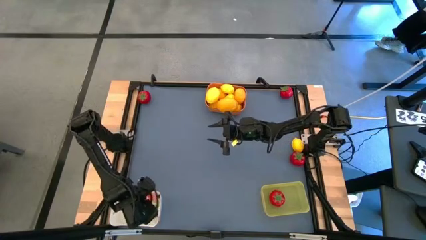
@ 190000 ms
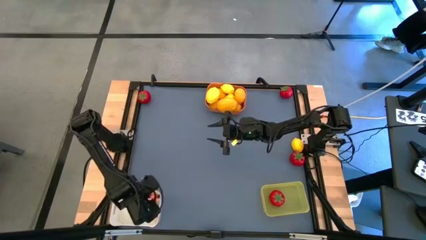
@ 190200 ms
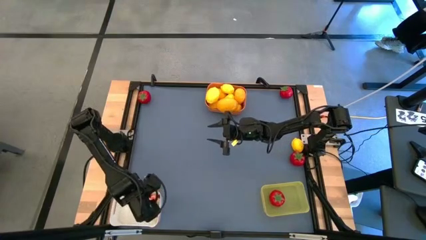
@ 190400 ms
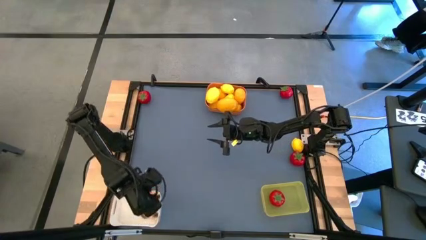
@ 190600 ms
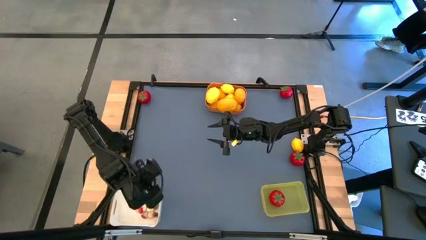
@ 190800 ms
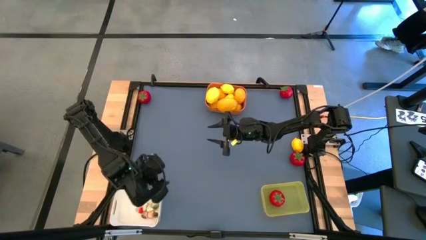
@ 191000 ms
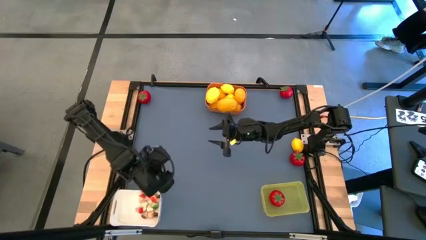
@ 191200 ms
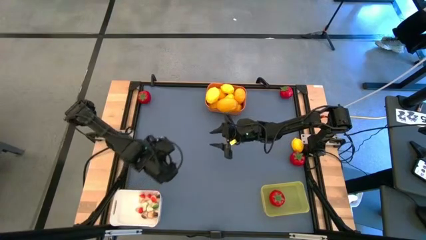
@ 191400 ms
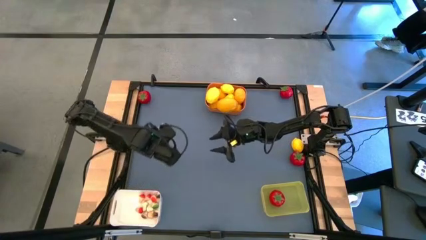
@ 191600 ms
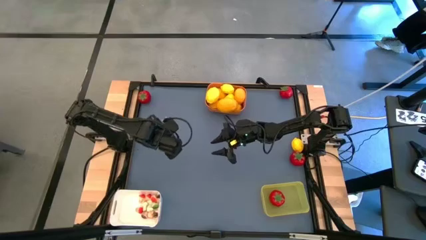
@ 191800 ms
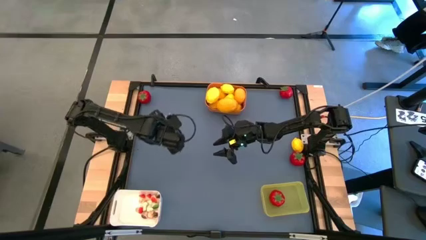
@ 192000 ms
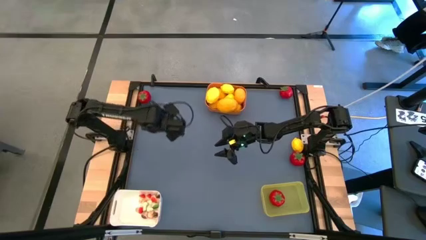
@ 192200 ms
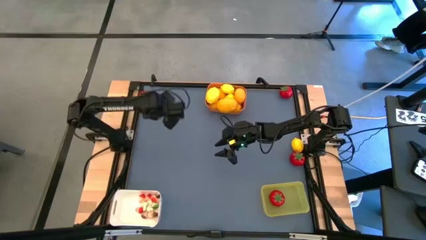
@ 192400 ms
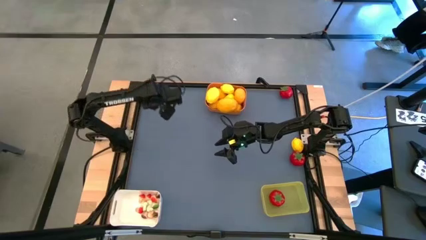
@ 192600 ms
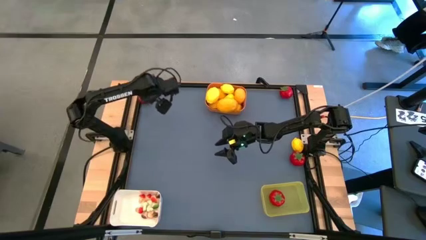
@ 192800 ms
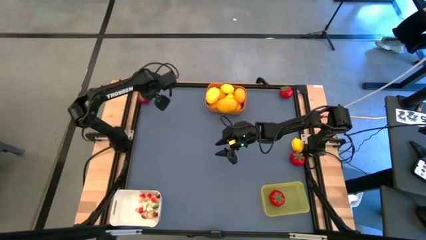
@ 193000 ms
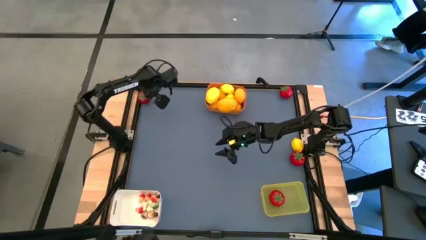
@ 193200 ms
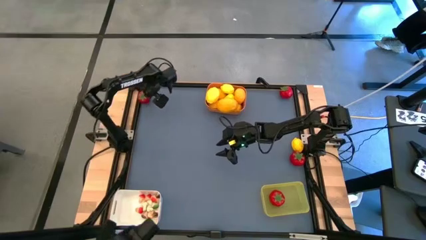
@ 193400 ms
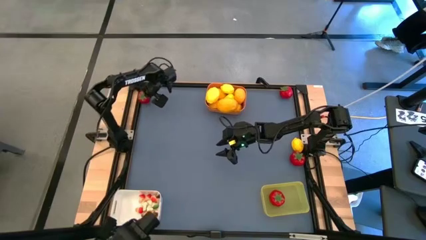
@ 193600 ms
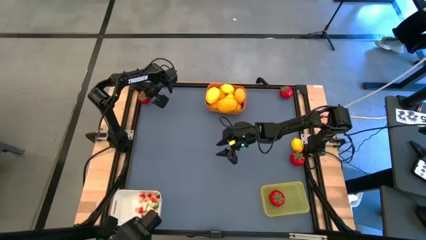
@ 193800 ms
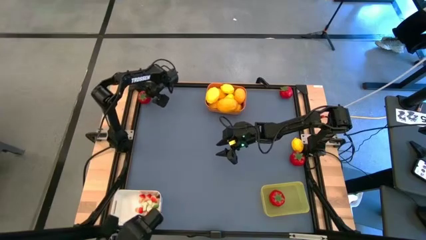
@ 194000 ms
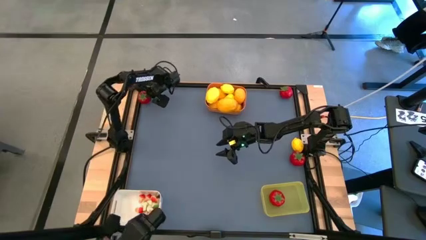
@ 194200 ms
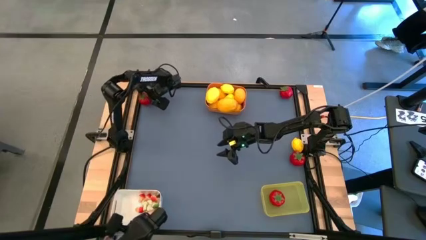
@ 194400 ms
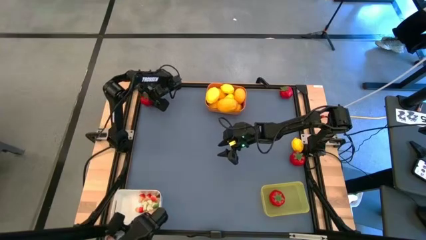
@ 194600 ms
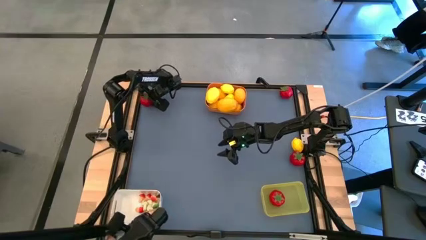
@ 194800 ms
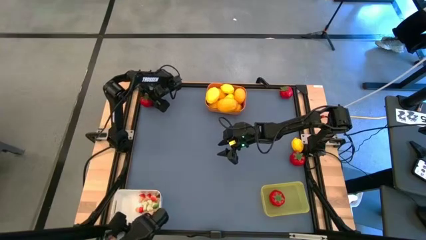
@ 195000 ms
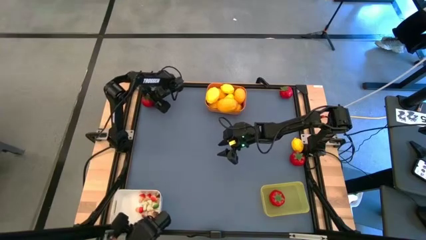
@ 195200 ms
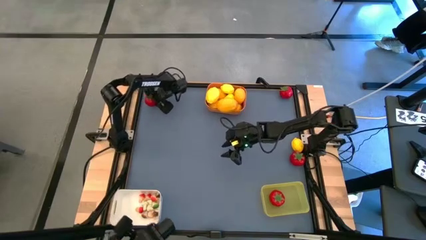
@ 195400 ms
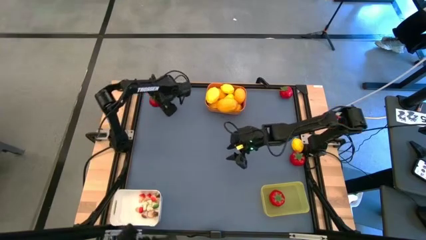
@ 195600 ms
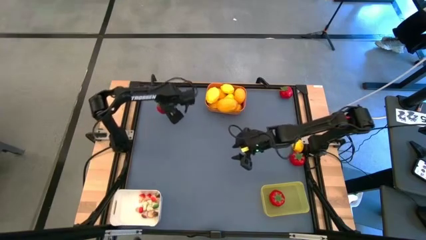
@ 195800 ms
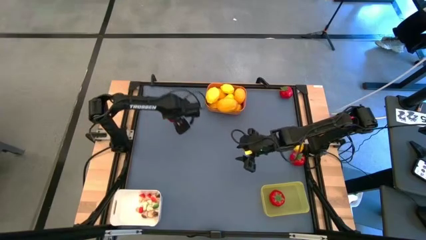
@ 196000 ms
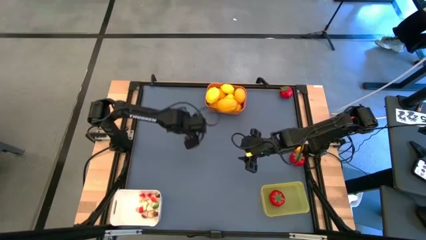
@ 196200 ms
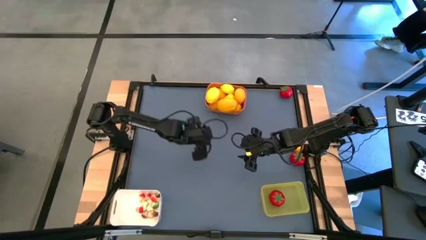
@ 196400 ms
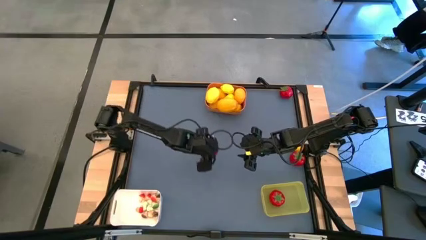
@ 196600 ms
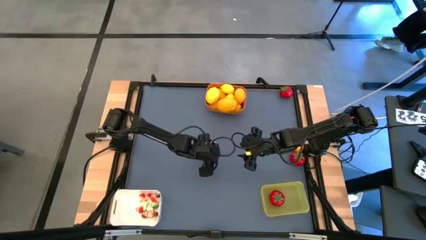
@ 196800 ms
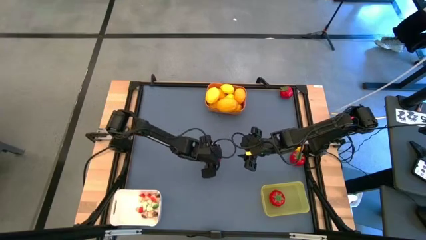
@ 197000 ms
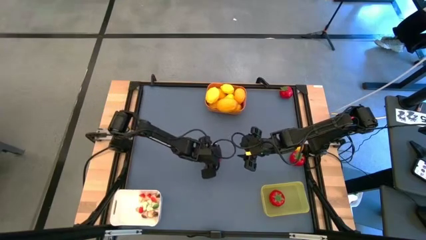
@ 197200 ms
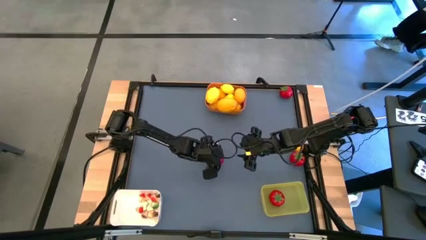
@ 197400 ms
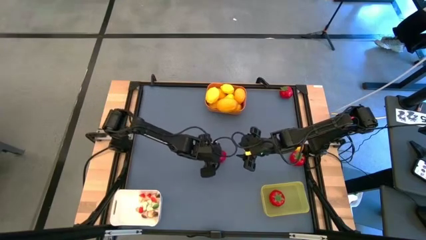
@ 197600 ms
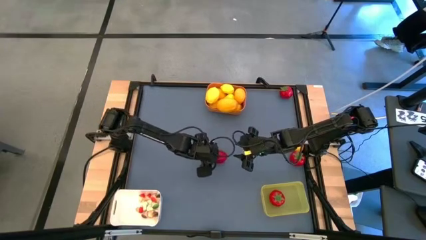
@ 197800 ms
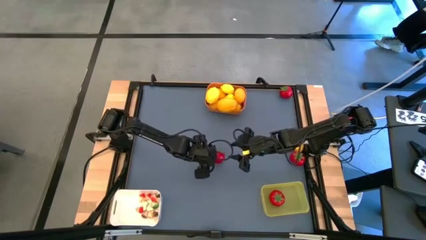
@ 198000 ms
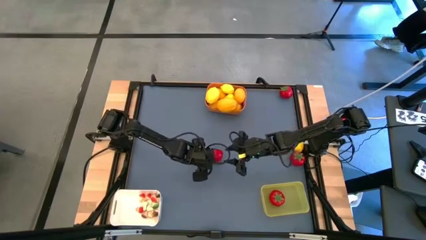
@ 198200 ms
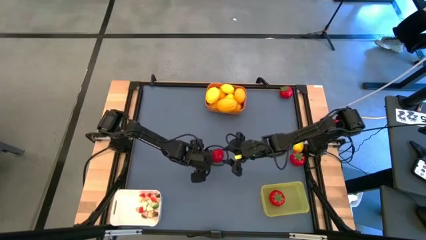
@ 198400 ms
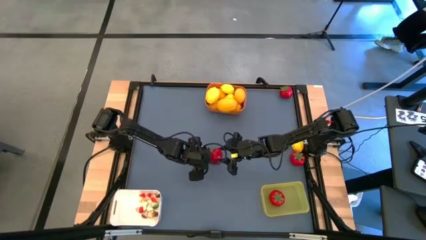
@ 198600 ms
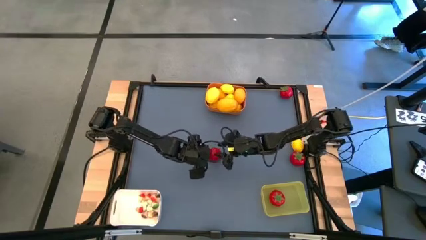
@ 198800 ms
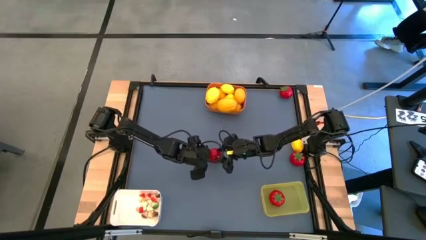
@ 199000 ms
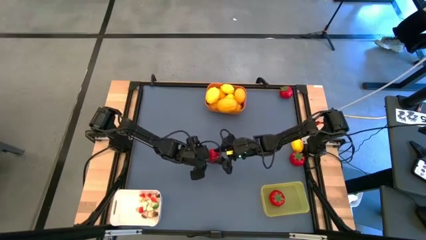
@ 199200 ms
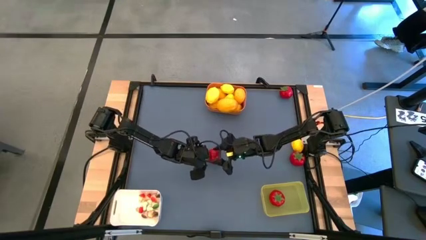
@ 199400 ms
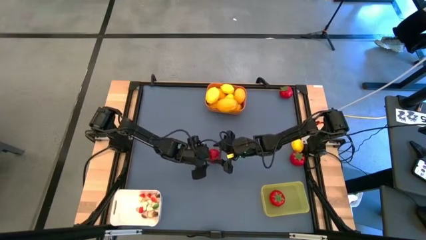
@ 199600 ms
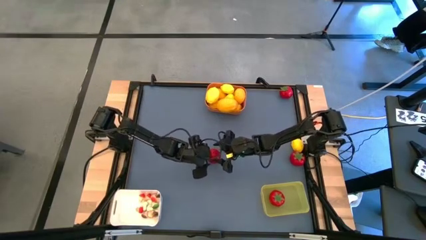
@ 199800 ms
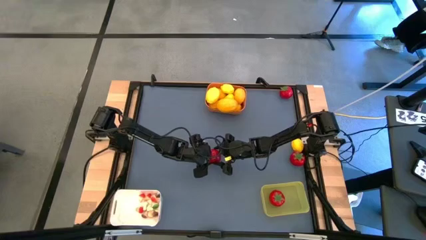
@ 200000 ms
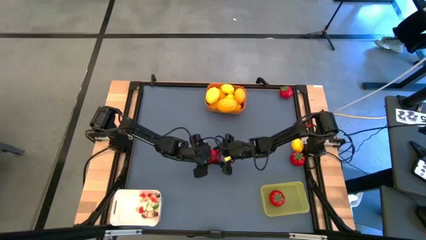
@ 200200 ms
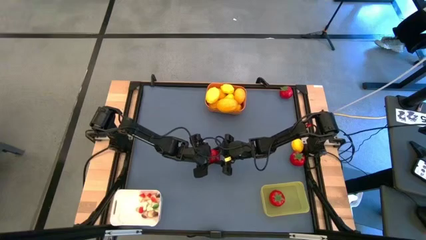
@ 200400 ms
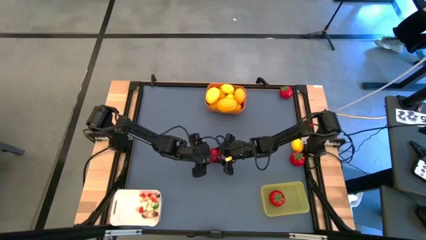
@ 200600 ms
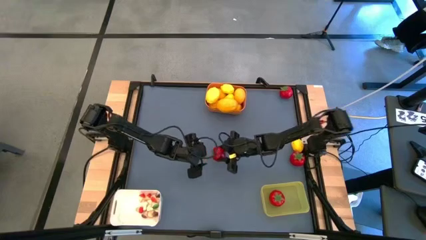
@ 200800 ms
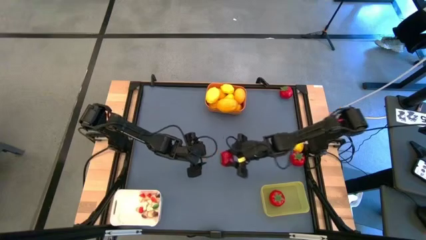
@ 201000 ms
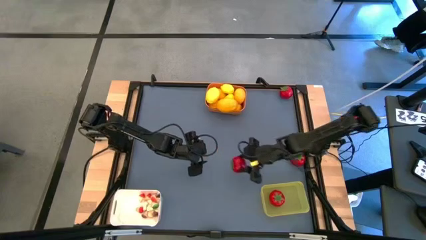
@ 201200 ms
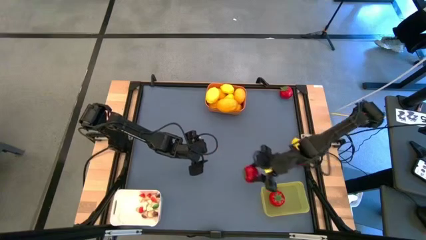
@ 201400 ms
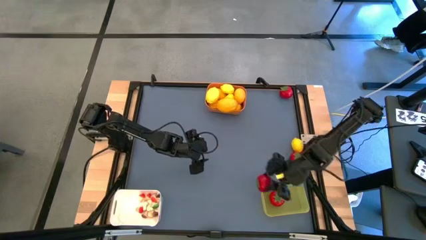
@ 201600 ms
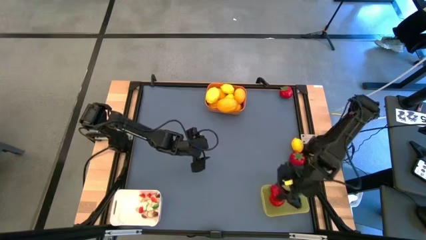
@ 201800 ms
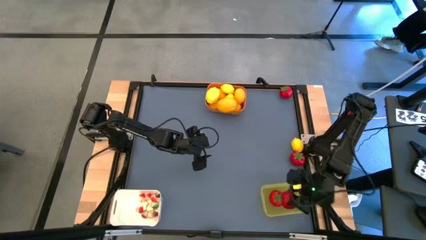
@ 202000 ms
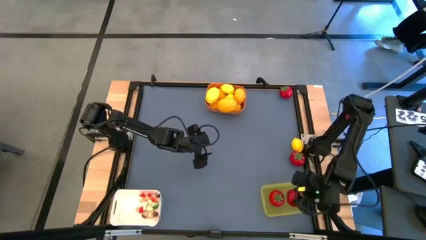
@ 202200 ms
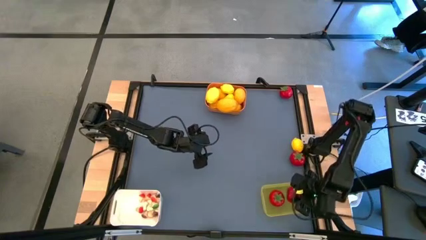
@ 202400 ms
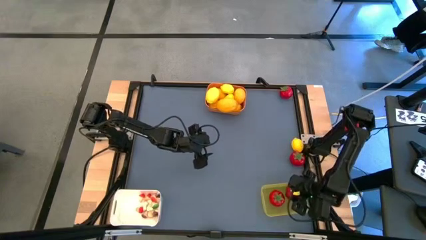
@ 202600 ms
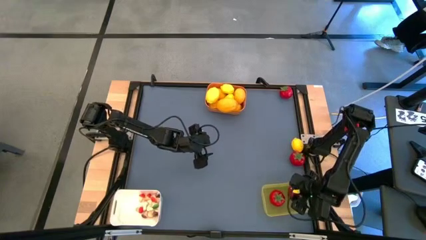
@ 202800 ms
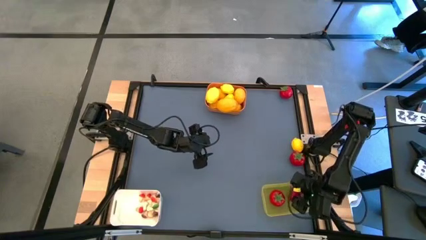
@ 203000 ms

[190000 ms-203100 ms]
Task: Sort produce into baskets
Put the red tomato into the yellow bin

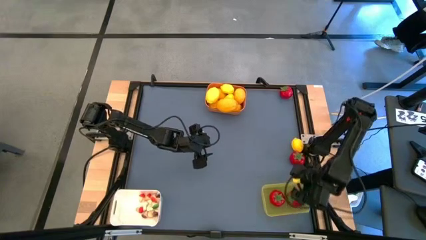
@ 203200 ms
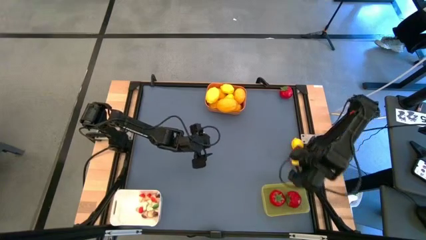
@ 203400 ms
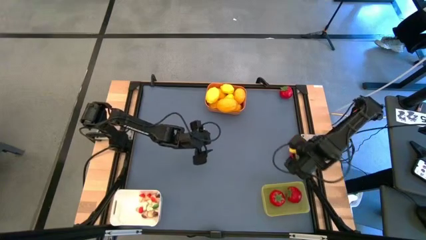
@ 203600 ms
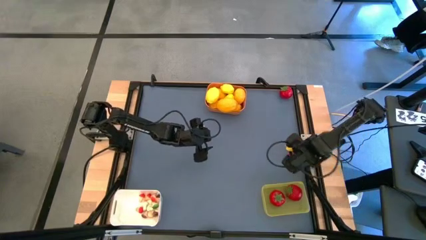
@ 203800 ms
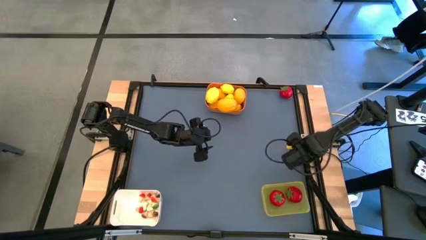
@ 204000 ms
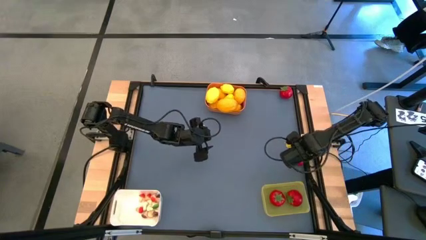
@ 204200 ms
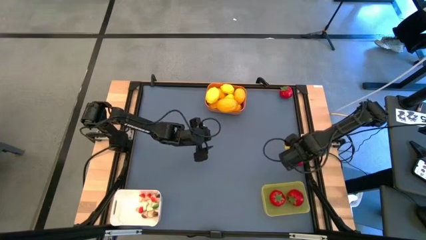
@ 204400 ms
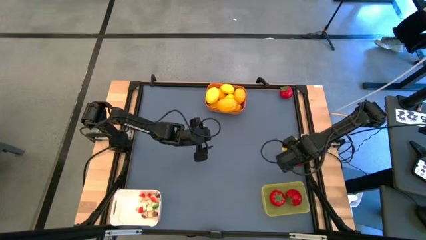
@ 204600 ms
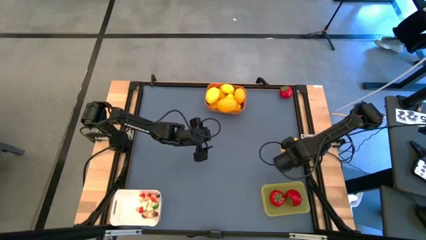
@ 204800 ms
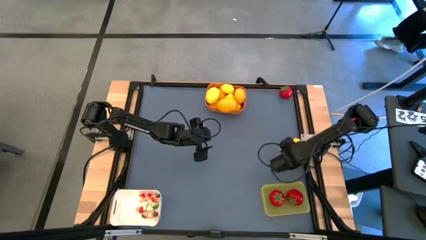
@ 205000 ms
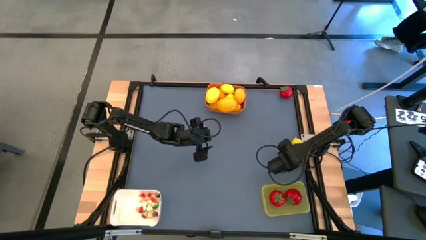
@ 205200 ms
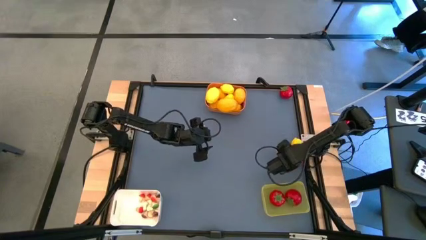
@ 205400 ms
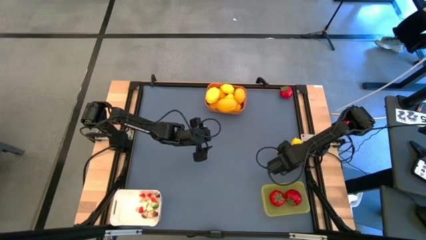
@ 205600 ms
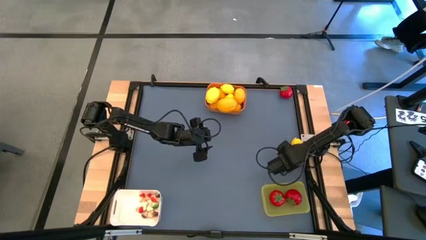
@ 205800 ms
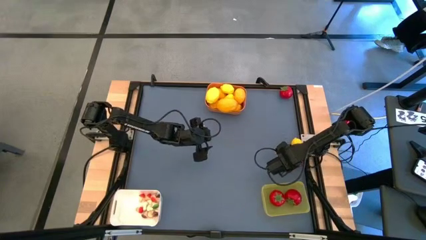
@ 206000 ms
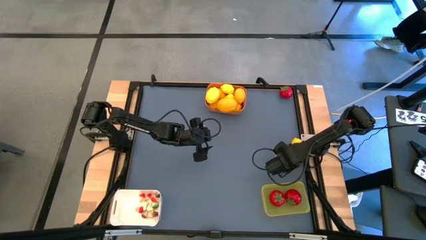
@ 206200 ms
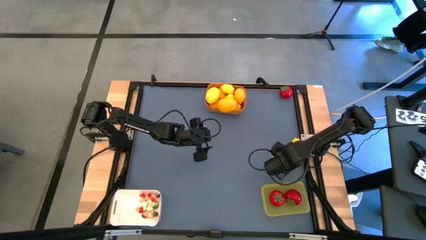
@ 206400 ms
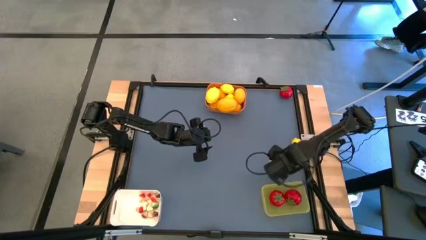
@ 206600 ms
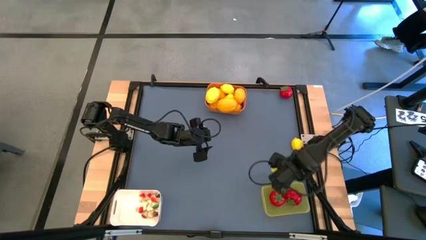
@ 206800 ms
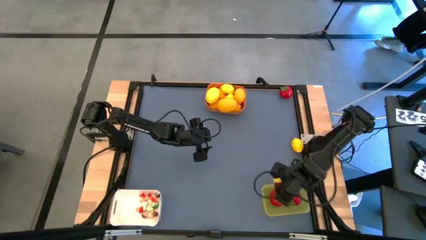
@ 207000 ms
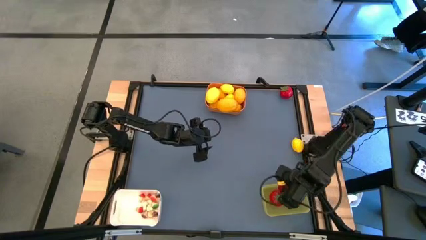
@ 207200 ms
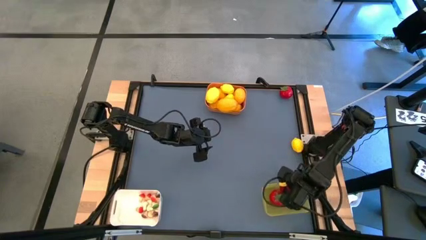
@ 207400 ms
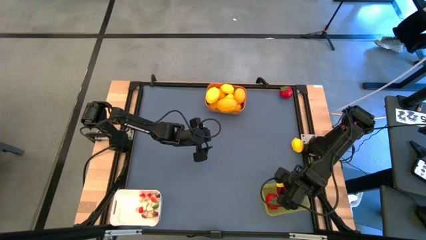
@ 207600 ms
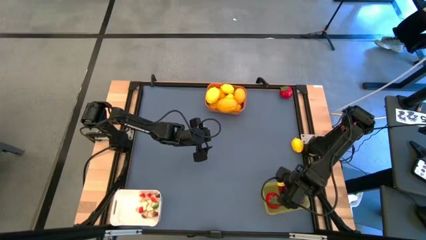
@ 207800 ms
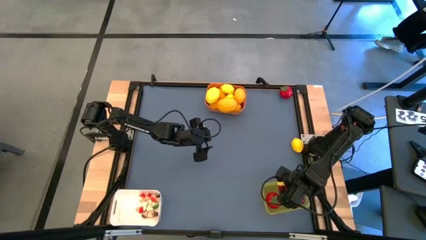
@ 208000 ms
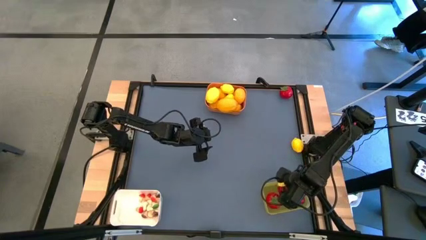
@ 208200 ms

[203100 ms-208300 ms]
Put the red tomato into the yellow bin
